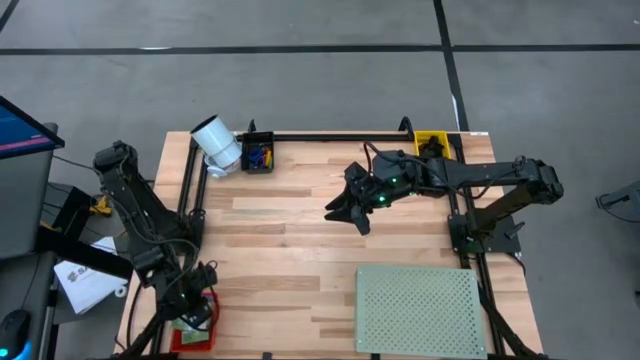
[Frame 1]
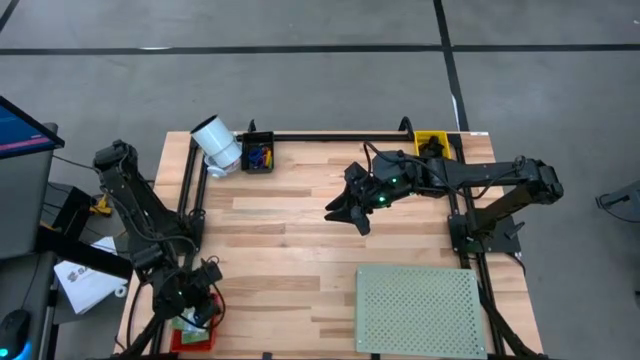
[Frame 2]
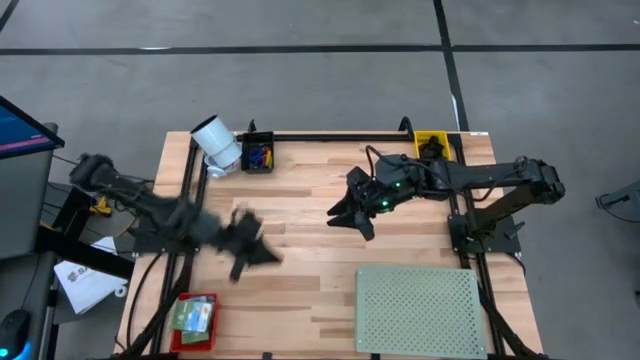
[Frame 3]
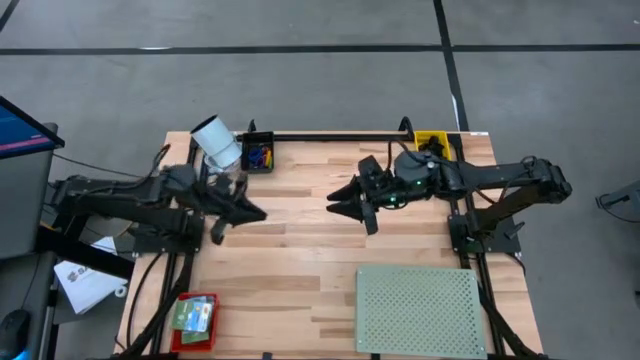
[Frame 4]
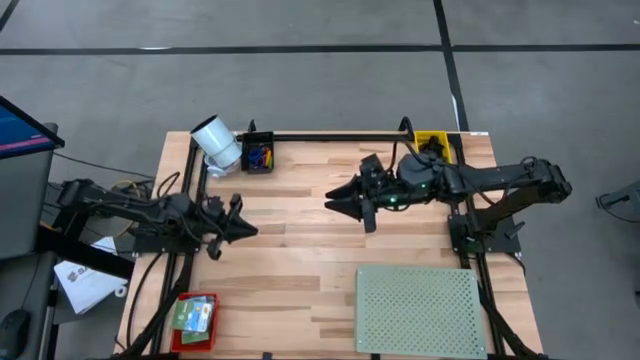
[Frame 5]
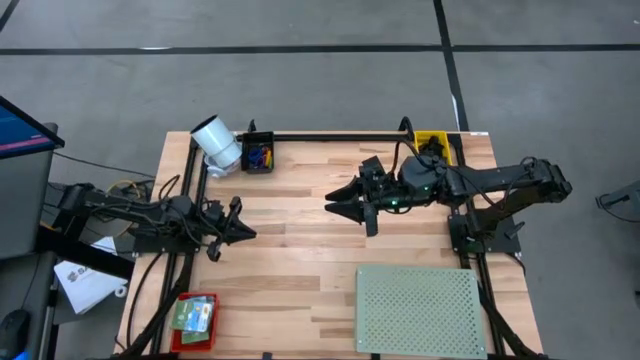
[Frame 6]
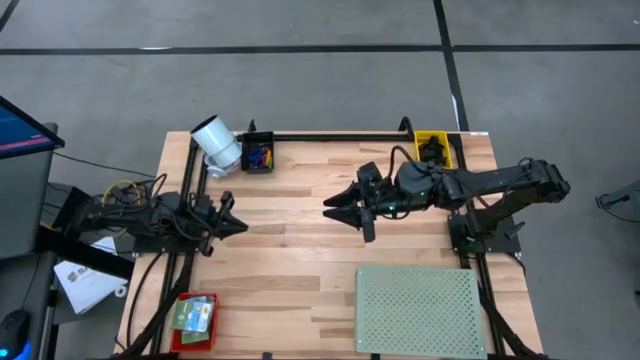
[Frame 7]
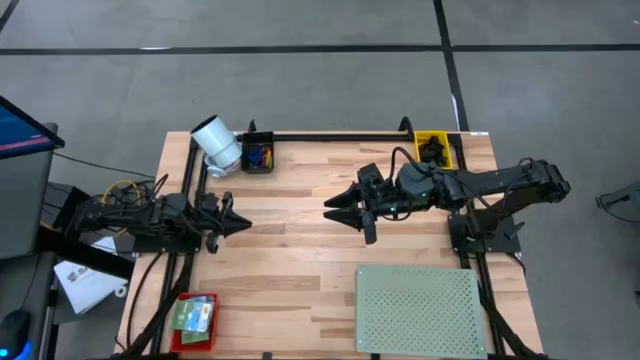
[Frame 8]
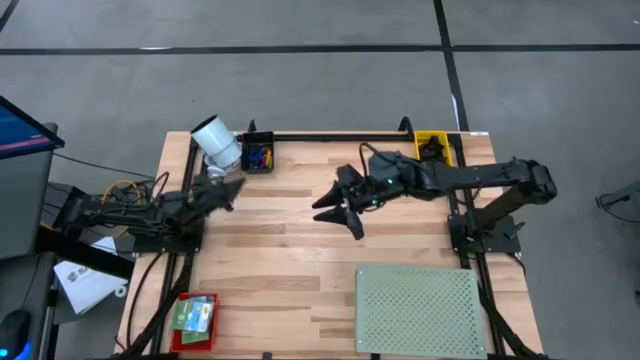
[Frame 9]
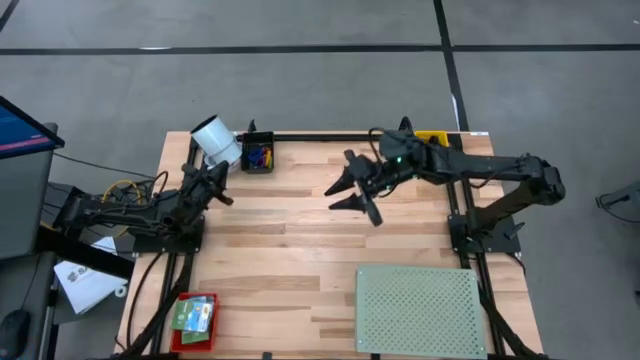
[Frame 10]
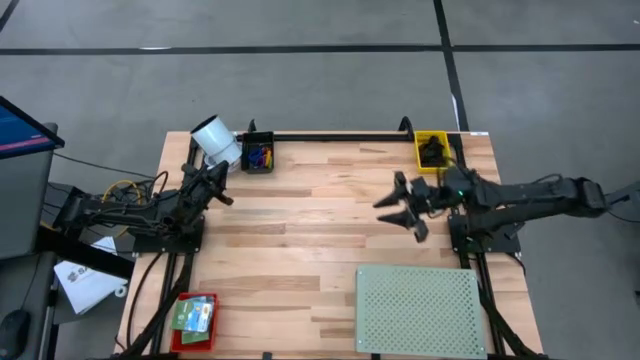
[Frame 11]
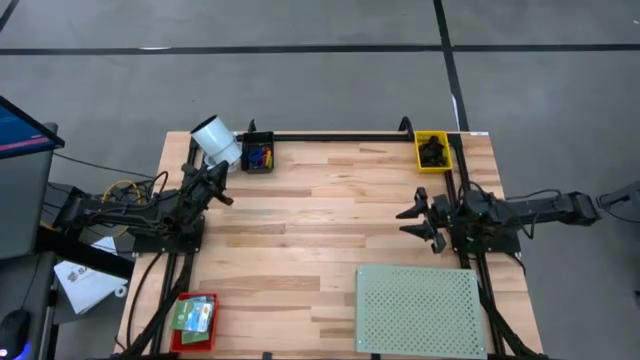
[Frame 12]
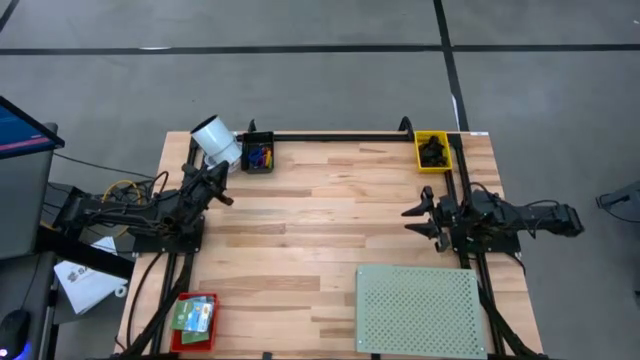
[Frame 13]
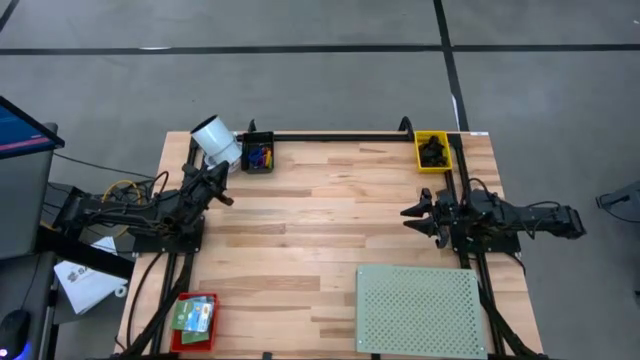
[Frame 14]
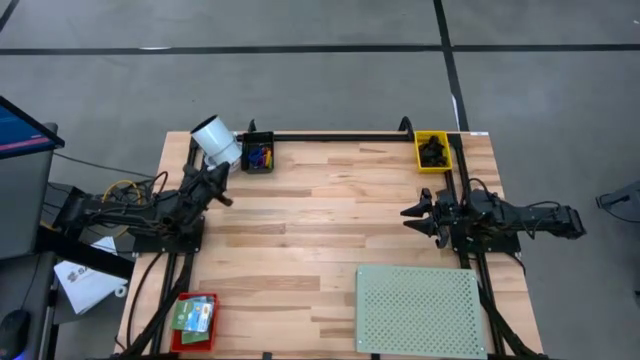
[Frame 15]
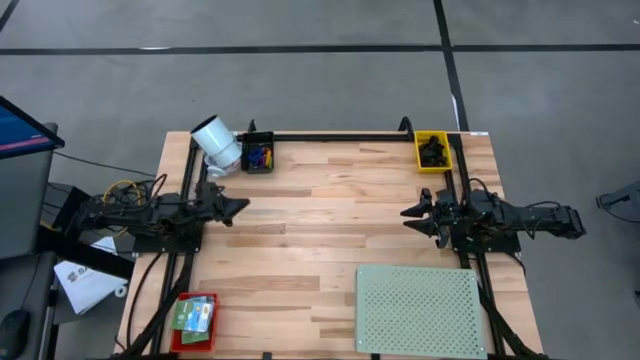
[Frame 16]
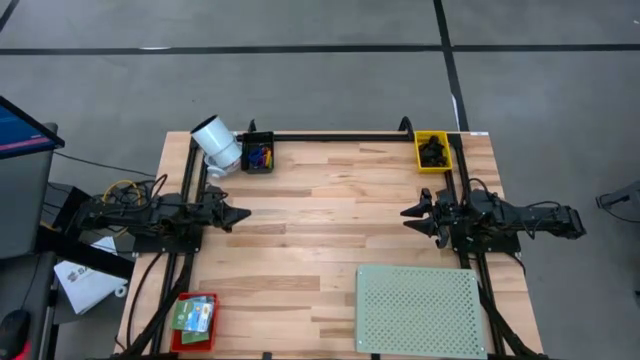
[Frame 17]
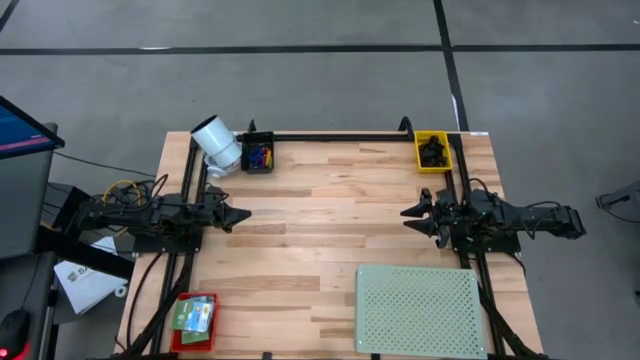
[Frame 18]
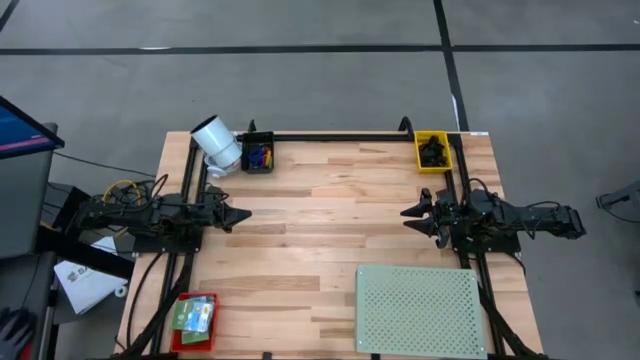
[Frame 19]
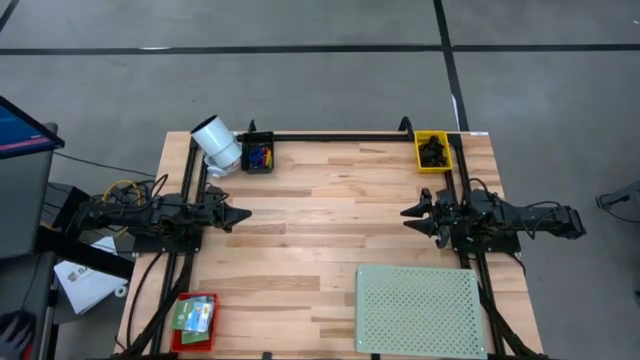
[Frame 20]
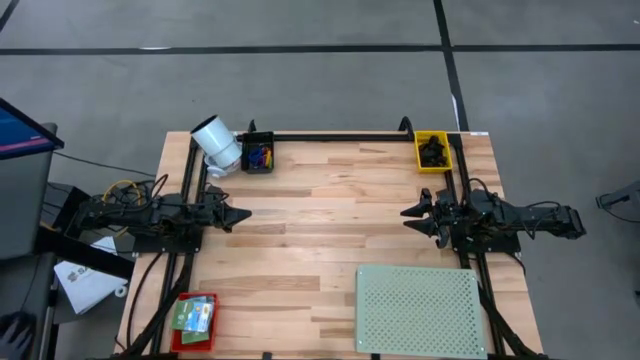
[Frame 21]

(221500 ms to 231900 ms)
Task: Pick & Place Office Desk Supplies
Return to Home Position

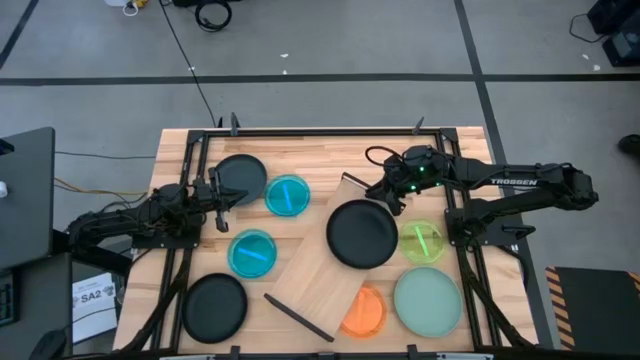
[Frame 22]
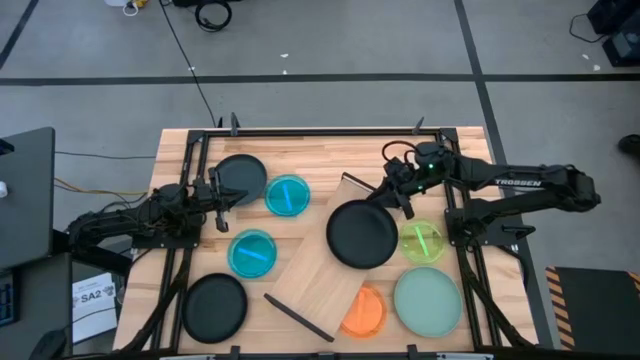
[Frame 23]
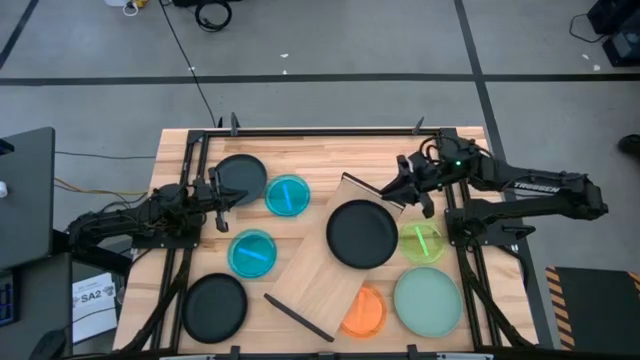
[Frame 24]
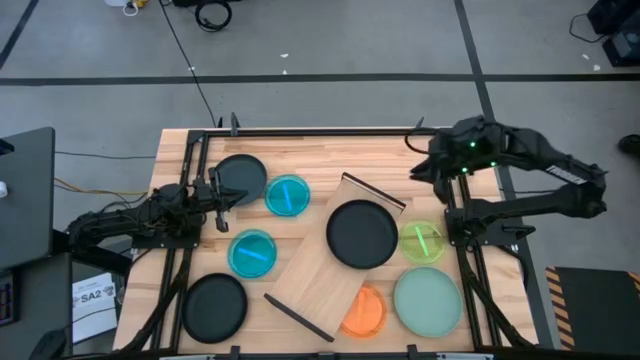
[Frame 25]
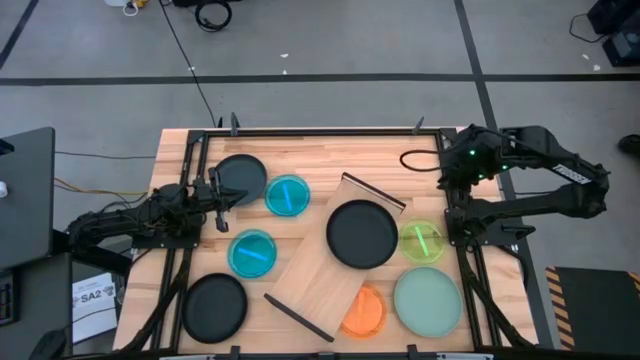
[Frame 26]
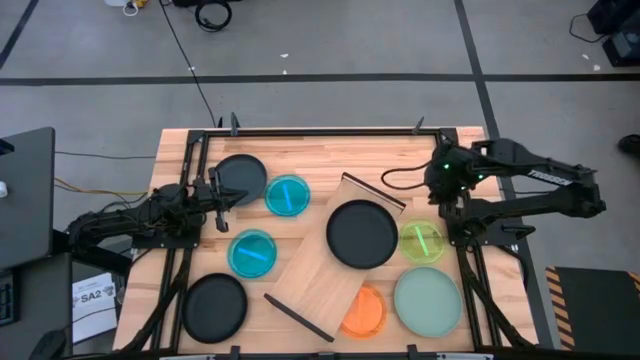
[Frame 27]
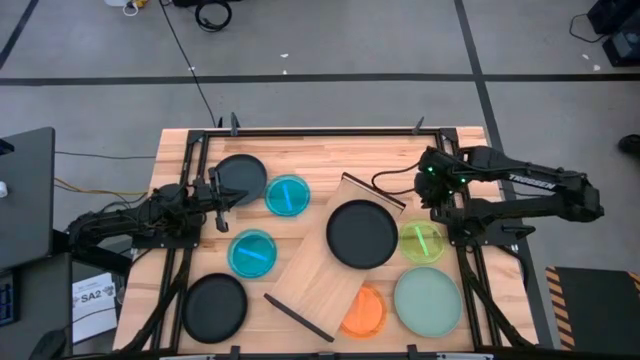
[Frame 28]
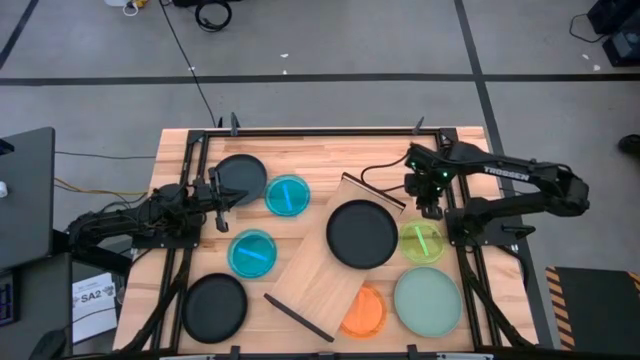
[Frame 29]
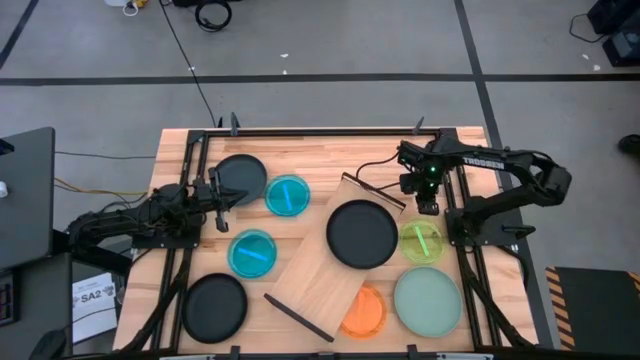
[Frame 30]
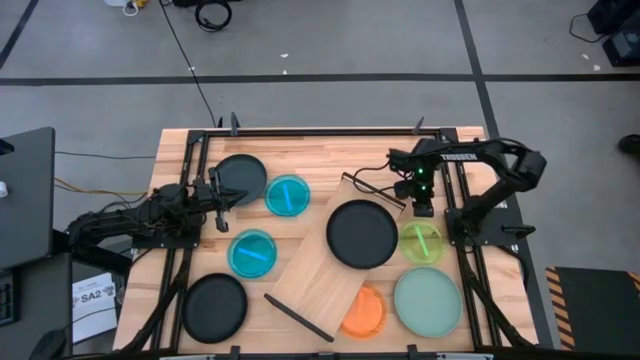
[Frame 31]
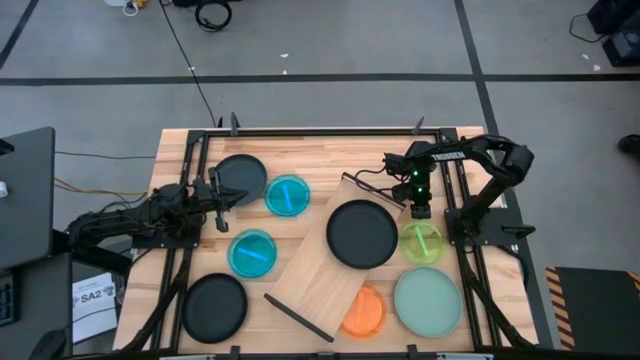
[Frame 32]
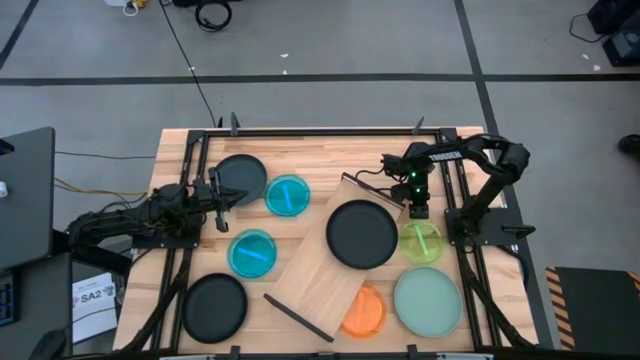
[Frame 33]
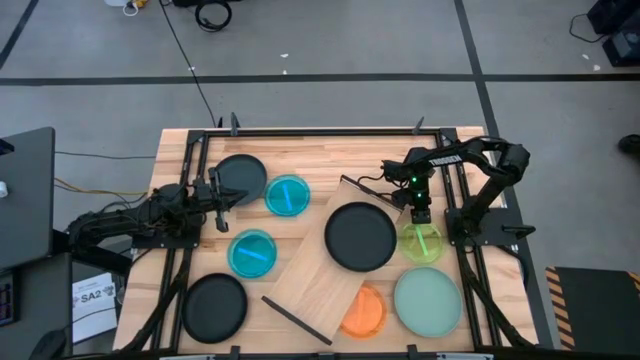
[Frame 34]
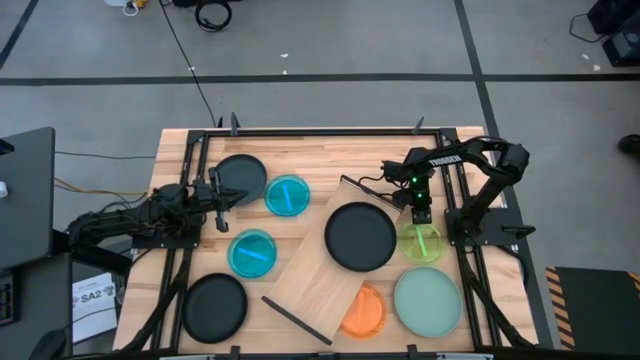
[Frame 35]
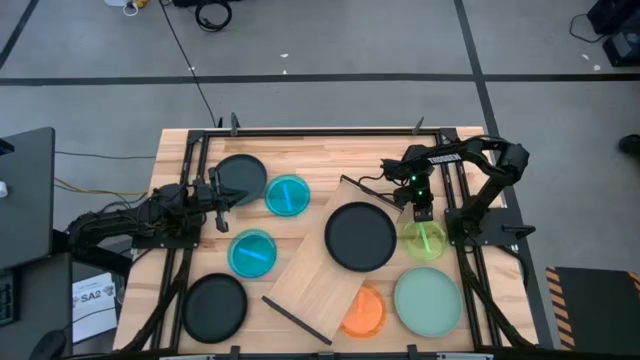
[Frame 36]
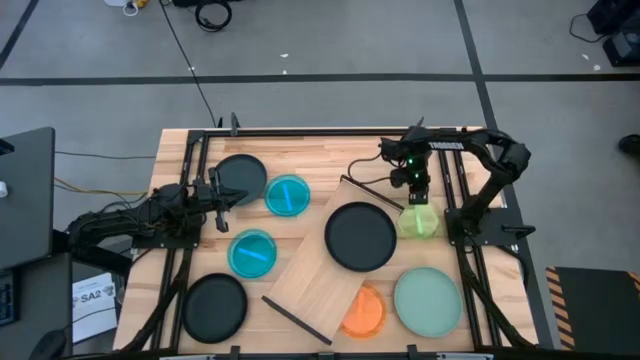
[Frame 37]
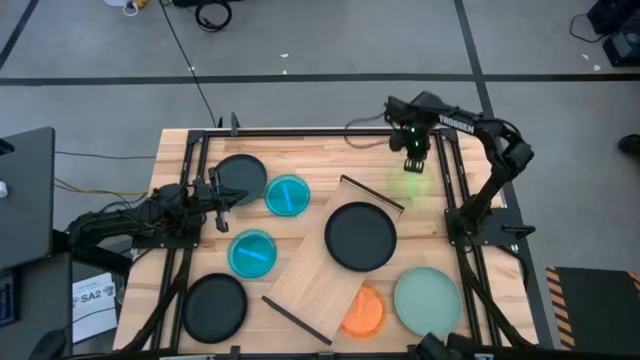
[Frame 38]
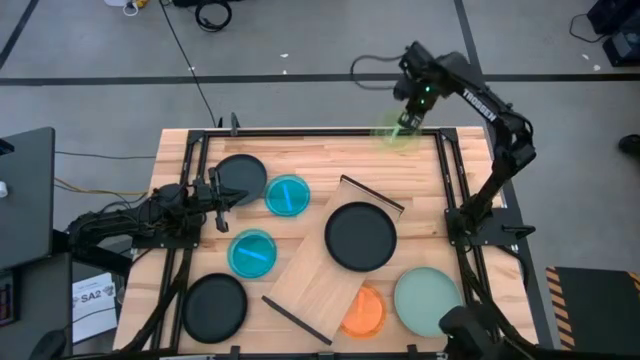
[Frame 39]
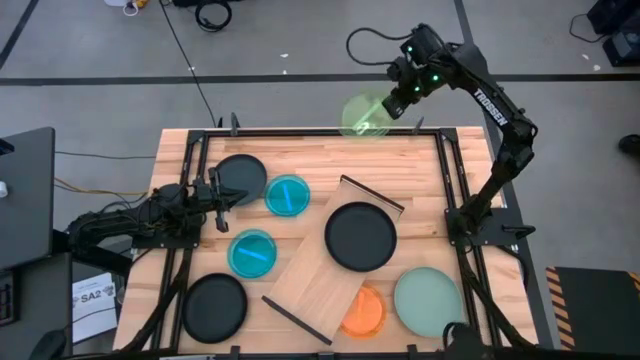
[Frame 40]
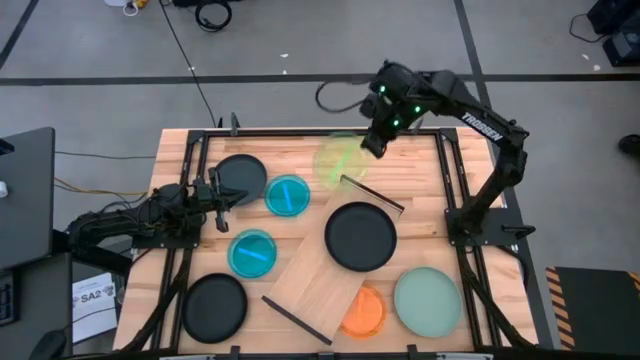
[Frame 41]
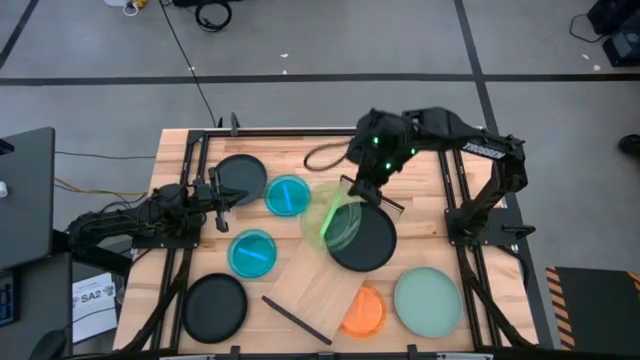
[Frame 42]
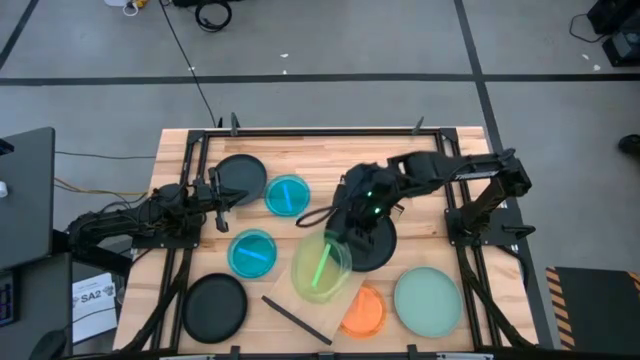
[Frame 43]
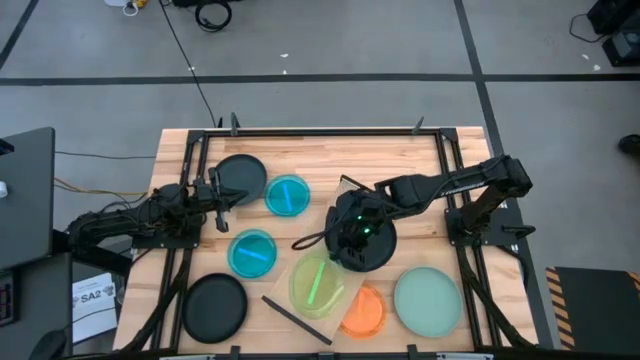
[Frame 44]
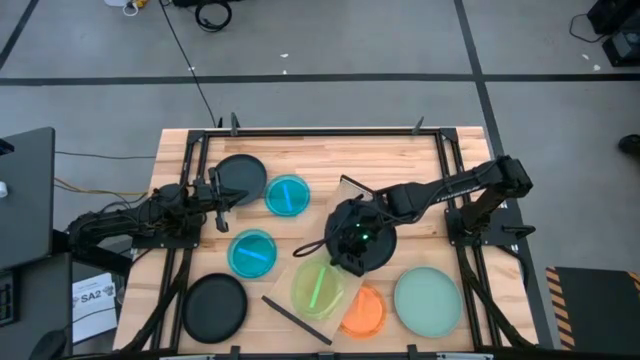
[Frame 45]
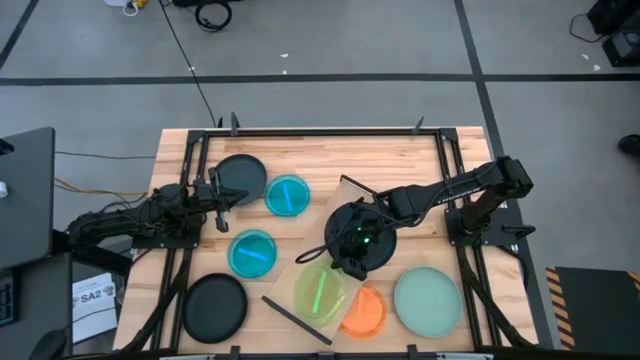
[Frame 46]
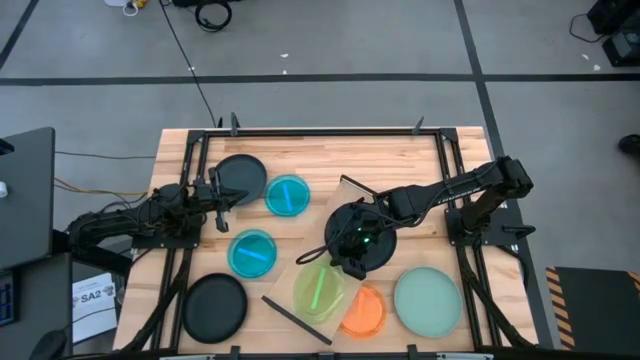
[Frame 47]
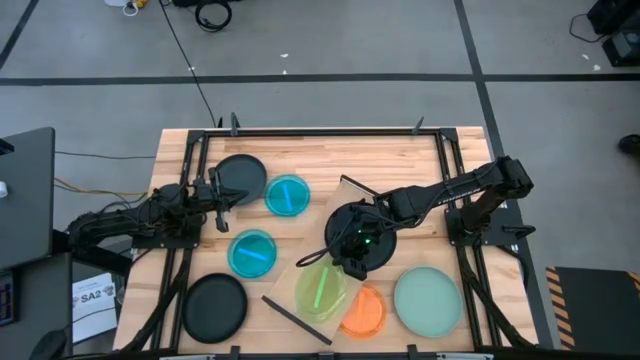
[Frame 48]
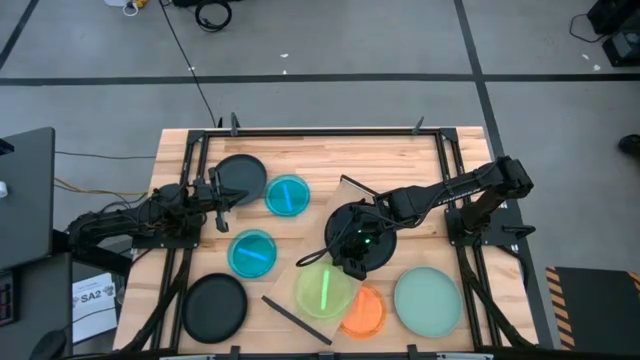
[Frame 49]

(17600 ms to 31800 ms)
Task: Place and stack plates onto a shelf
Put the green plate on the shelf
